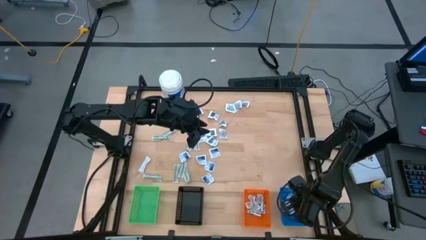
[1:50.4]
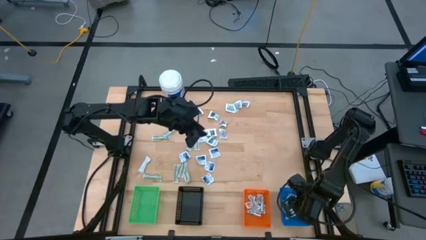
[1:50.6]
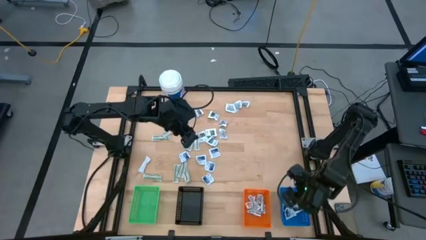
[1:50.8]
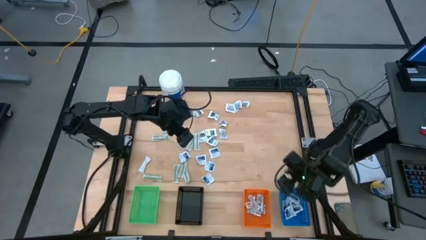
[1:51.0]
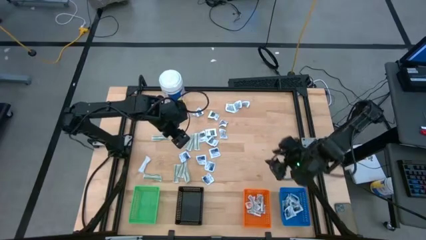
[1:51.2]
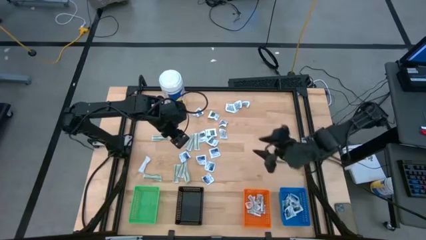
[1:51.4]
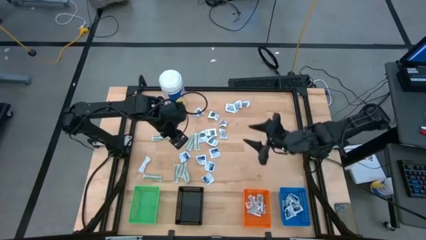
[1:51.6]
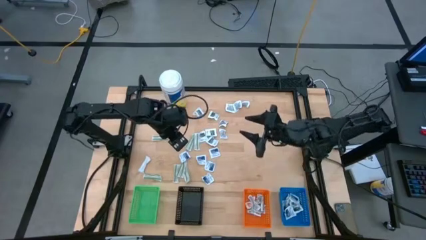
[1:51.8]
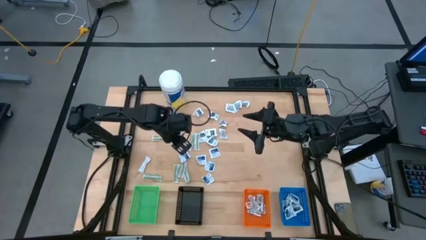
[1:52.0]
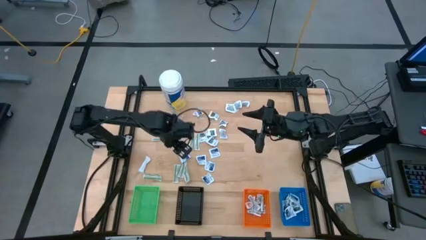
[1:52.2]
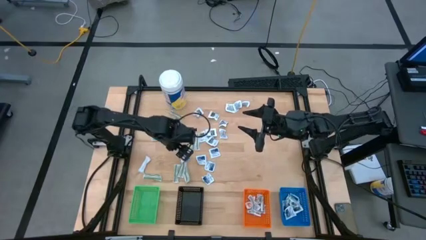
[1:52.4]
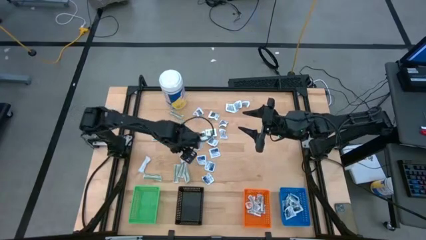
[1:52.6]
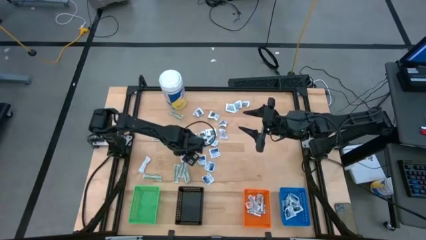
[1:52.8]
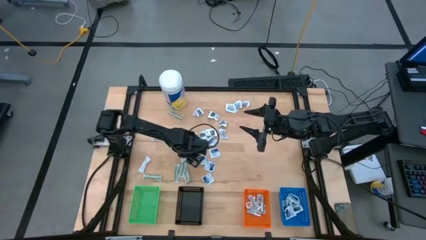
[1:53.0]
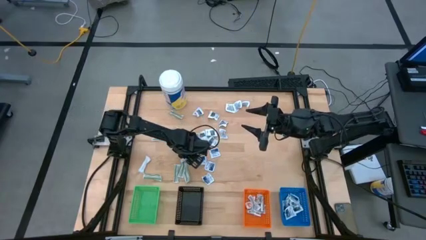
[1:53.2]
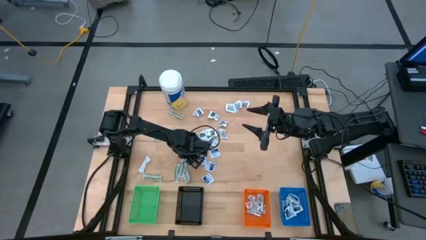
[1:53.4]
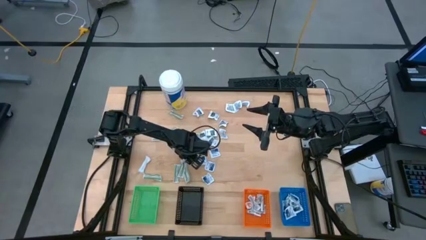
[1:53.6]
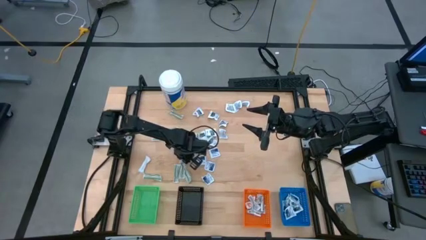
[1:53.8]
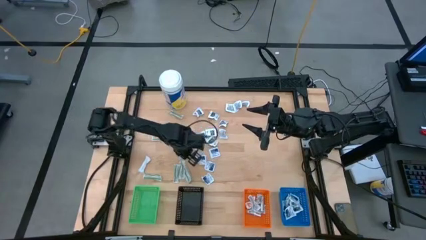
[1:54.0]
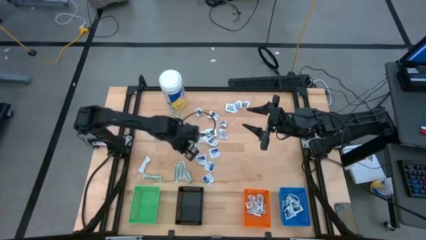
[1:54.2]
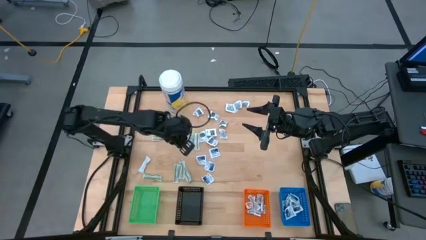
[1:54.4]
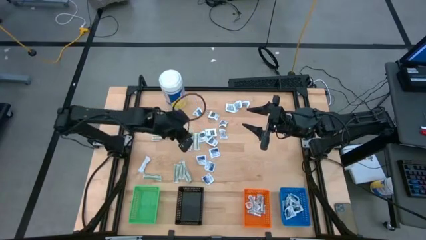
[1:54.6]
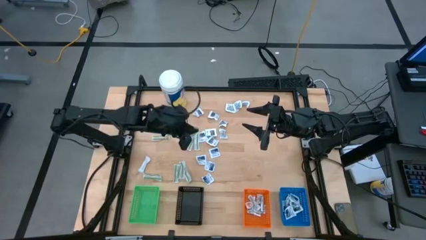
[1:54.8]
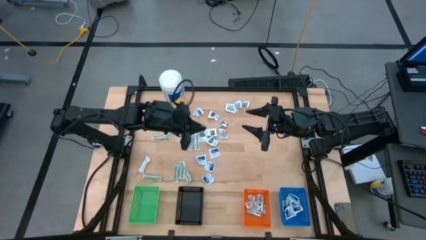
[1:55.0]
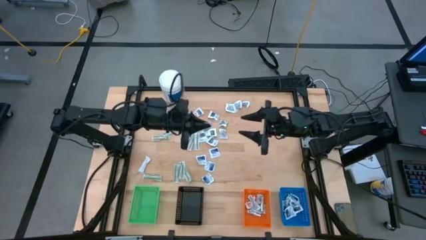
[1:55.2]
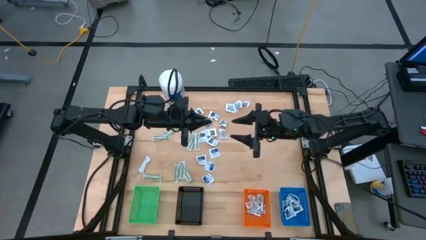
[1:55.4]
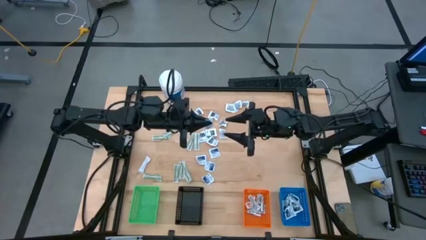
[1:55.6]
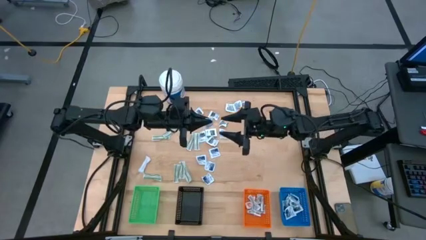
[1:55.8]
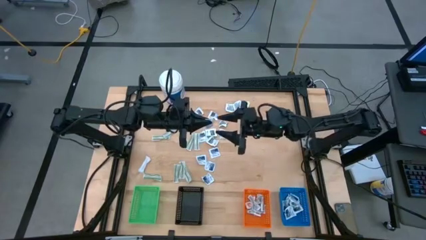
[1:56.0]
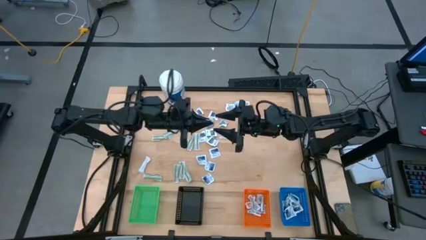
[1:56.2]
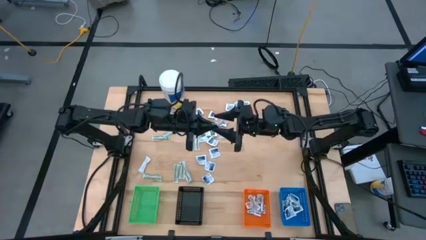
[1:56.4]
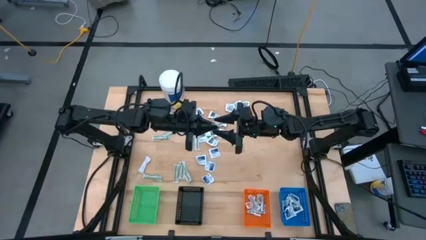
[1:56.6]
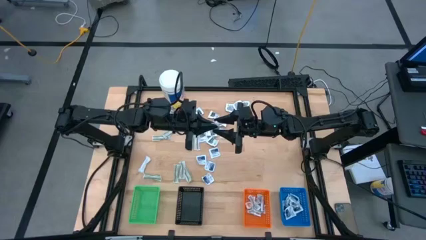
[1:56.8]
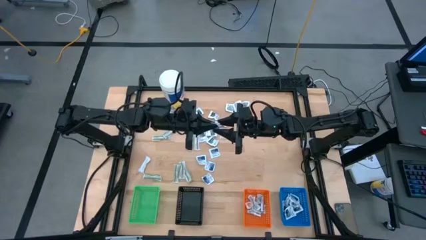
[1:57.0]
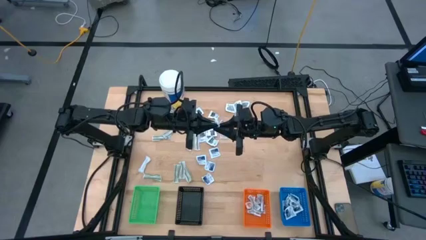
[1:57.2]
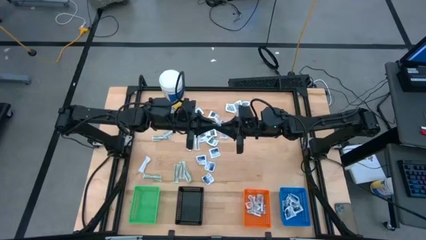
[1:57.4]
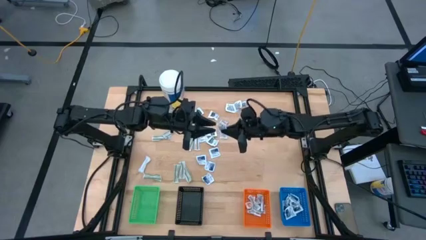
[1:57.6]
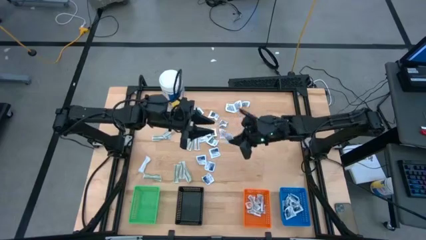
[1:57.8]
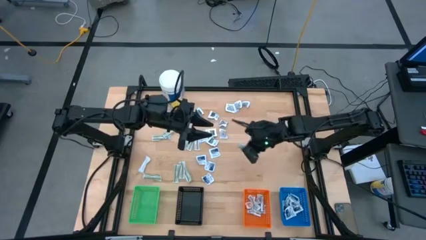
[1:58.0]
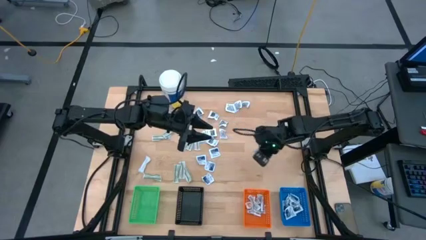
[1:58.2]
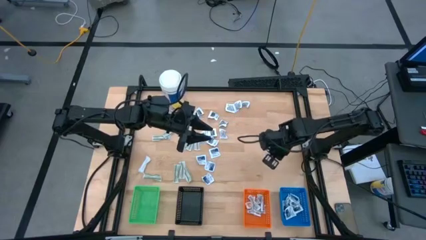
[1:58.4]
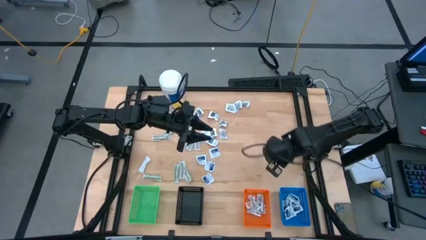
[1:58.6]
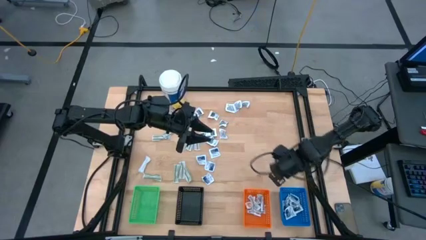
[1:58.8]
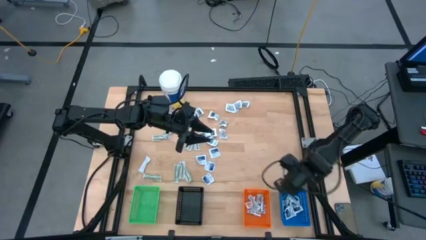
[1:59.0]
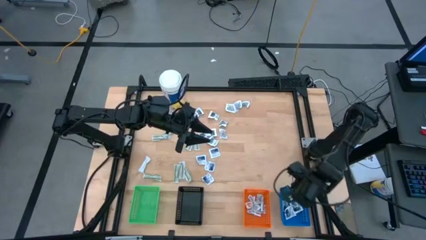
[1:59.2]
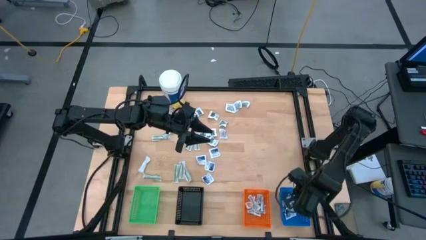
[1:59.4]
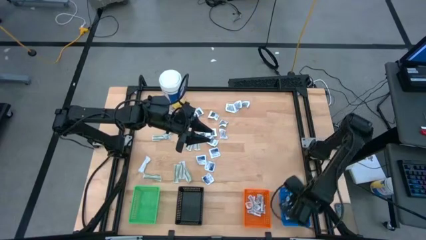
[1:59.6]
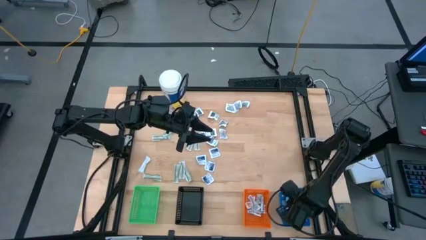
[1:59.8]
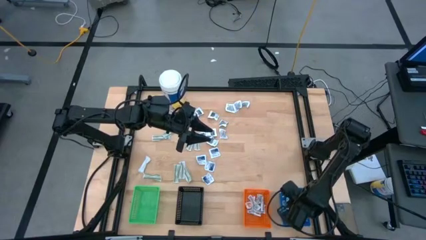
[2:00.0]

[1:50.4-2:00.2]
Task: Pick & Place First Aid Supplies
Put the alcohol pad into the blue bin

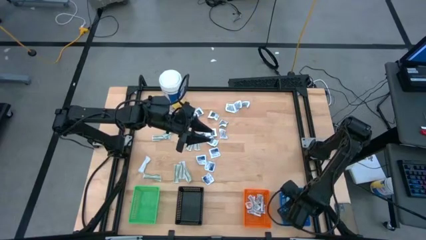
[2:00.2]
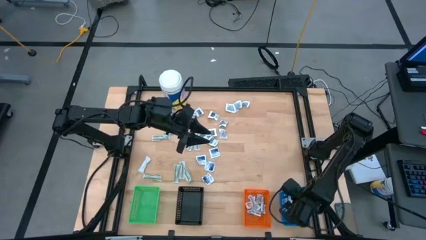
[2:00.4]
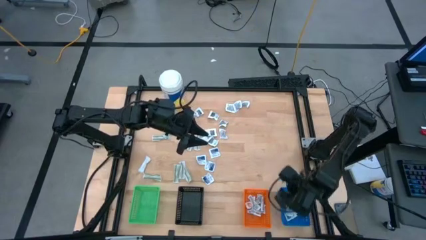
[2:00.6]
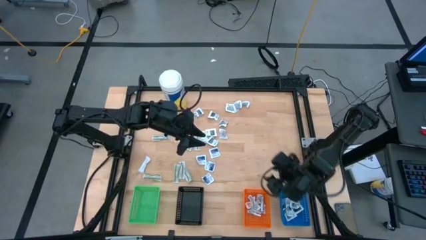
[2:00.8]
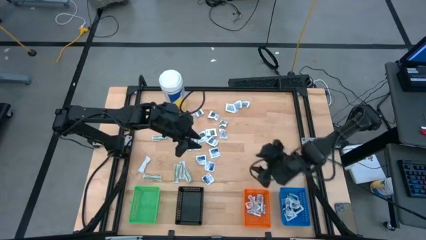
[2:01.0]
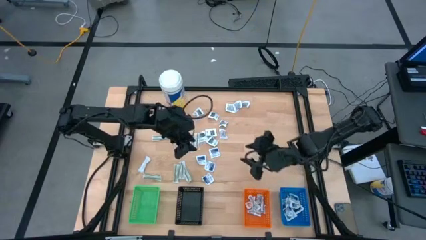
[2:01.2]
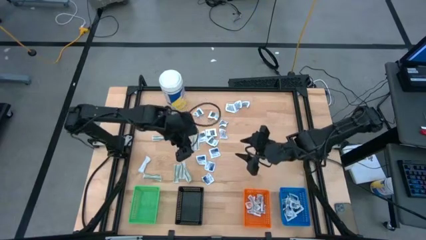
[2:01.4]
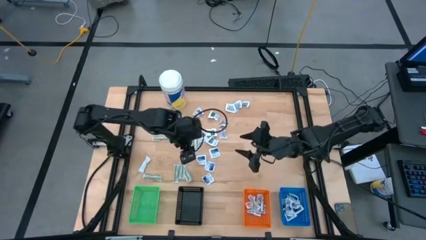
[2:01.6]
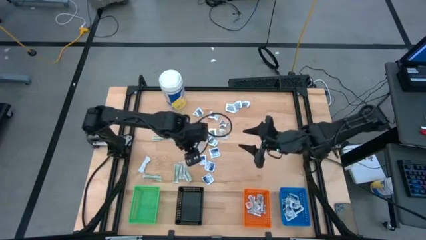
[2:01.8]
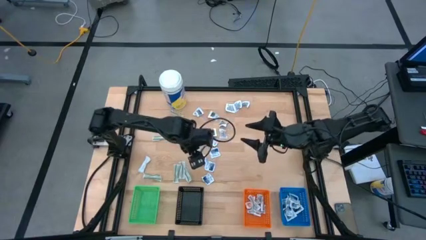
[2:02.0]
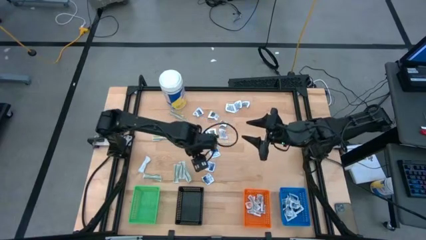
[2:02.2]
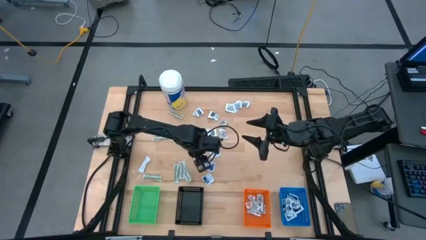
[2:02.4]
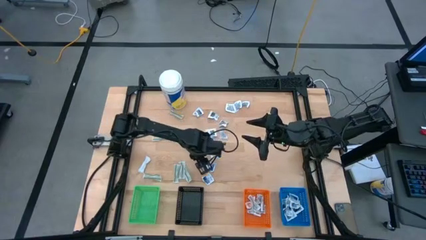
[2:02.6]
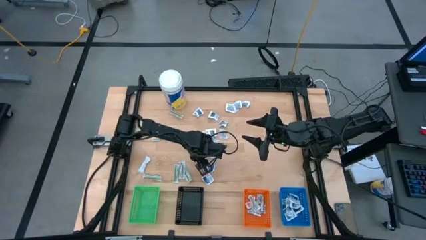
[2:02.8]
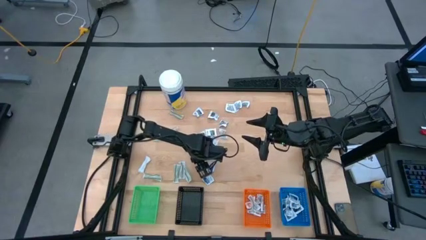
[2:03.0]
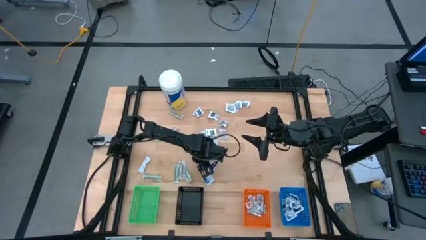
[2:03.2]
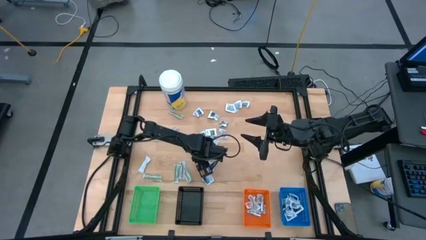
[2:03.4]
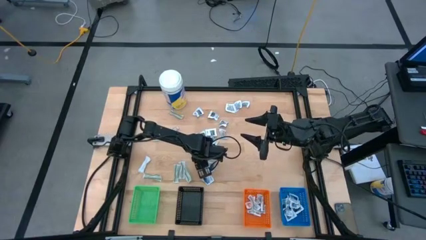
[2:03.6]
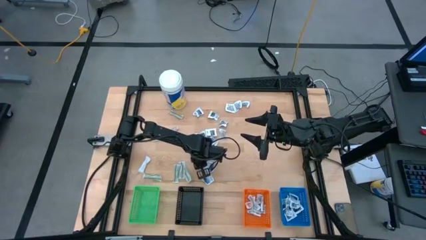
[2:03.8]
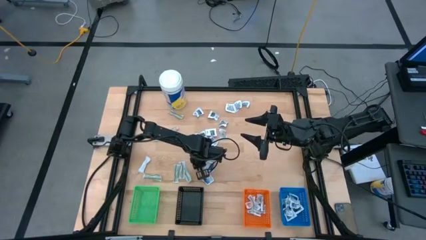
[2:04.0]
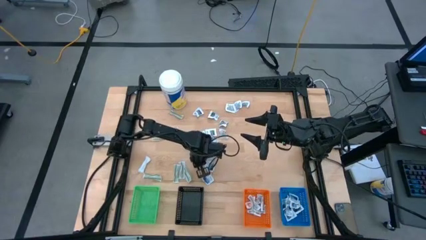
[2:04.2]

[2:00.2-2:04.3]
Put the alcohol pad into the blue bin

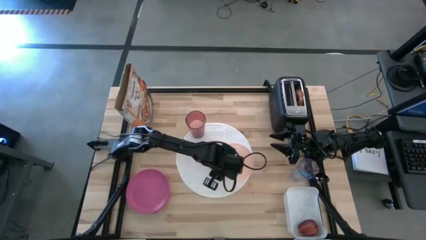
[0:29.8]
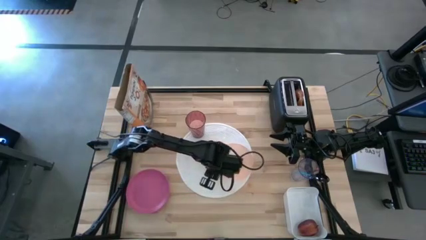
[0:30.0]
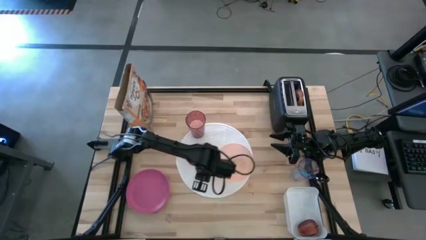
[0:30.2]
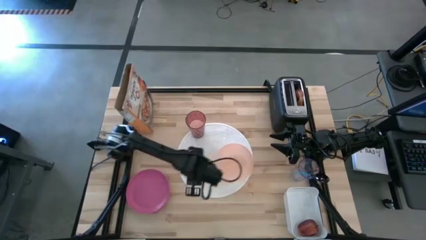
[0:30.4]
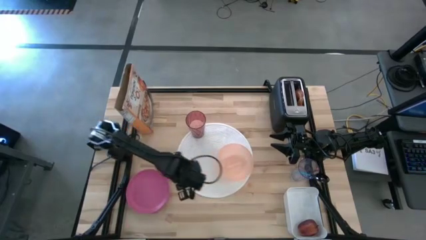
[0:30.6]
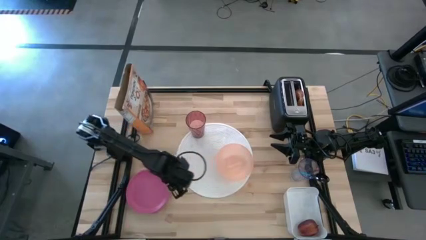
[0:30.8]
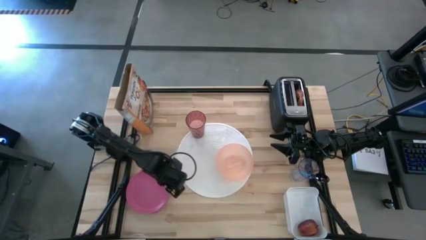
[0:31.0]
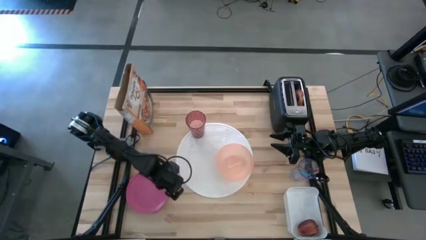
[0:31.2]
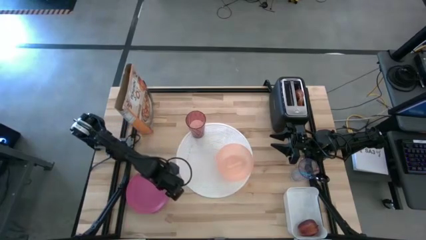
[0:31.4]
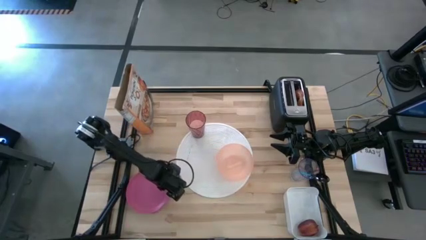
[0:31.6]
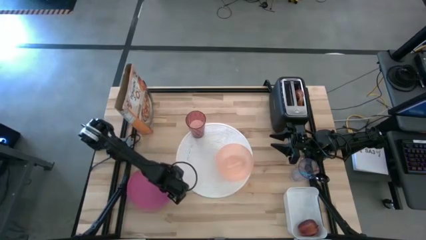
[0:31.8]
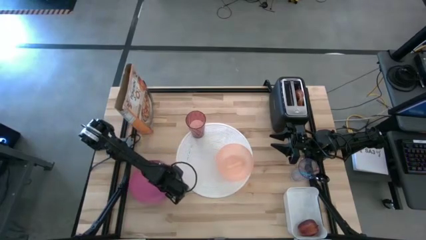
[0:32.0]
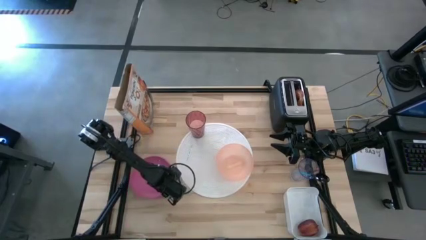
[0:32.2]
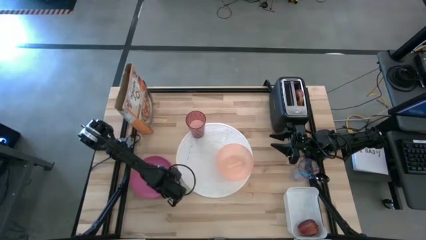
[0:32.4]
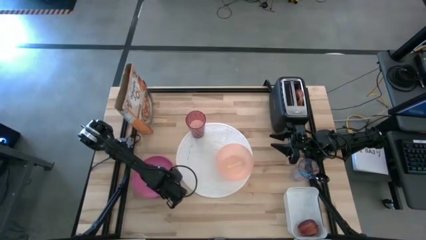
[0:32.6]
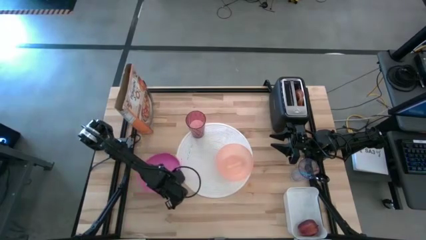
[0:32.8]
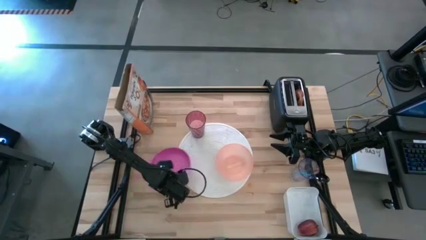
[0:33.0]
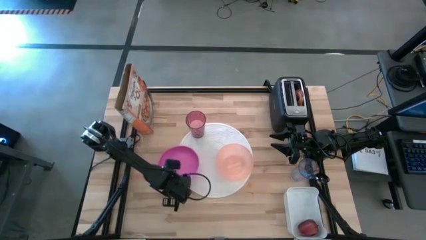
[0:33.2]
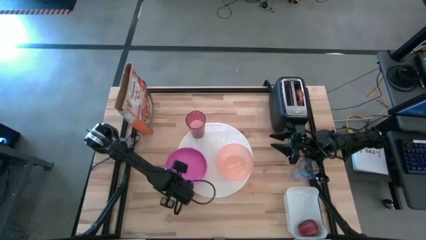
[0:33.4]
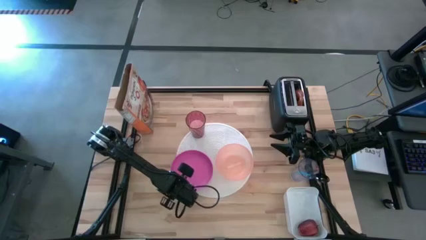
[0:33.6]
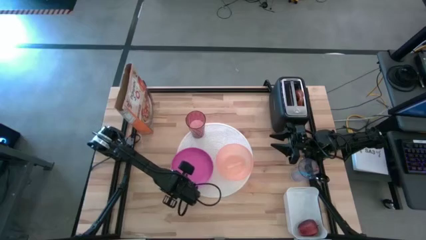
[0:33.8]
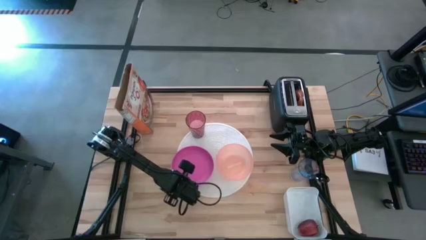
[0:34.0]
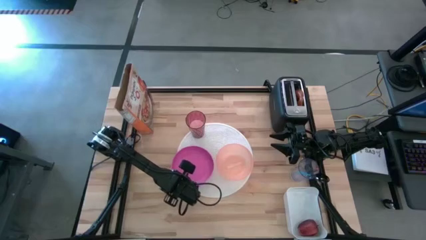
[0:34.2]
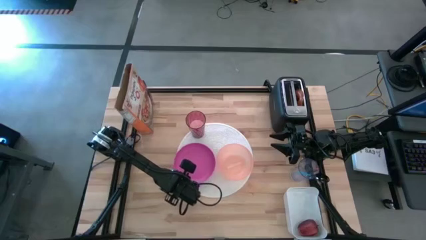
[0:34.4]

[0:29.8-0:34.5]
Task: Arrange a breakfast setting
Put the pink plate on the left side of the white mat
